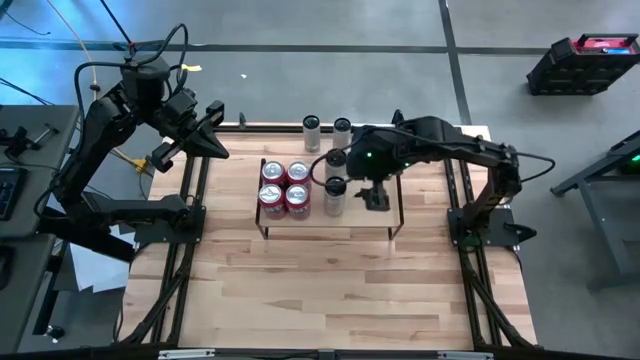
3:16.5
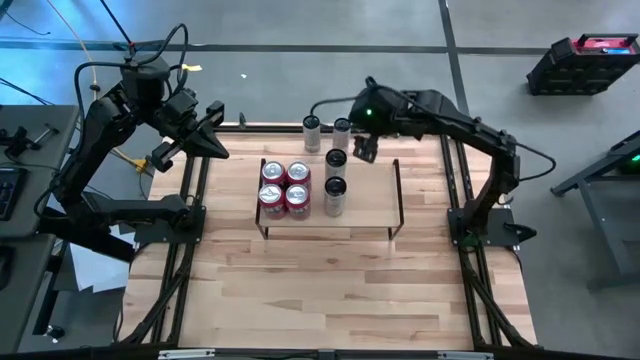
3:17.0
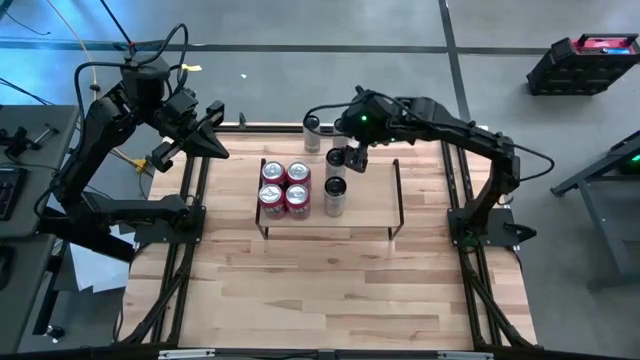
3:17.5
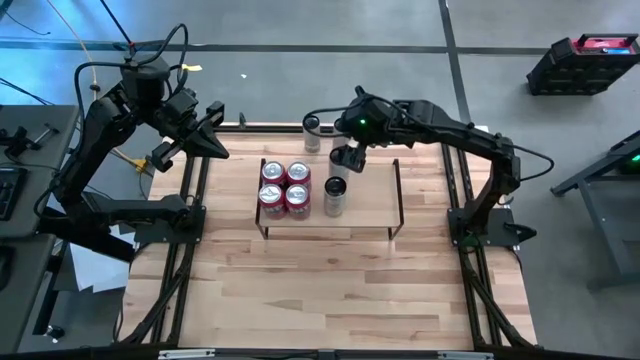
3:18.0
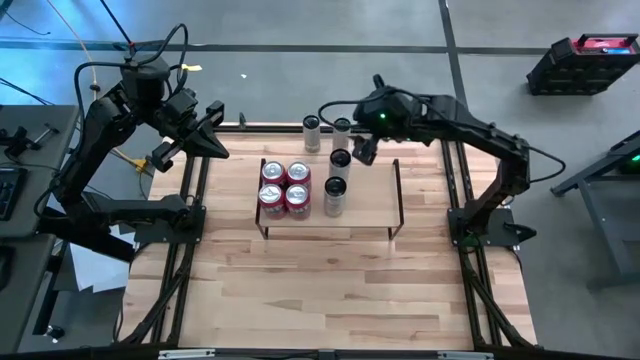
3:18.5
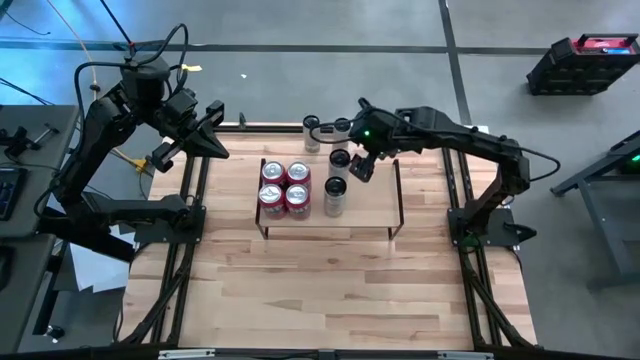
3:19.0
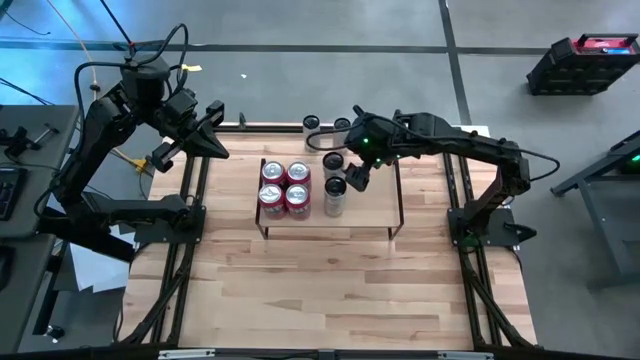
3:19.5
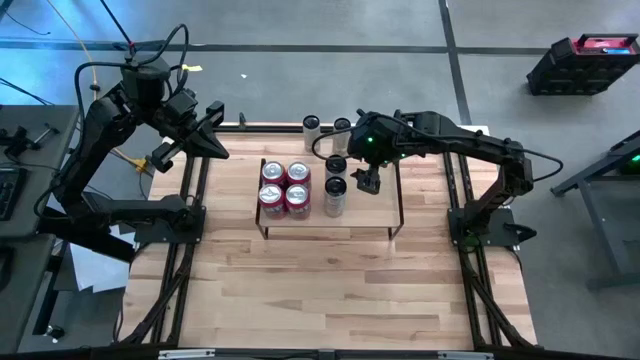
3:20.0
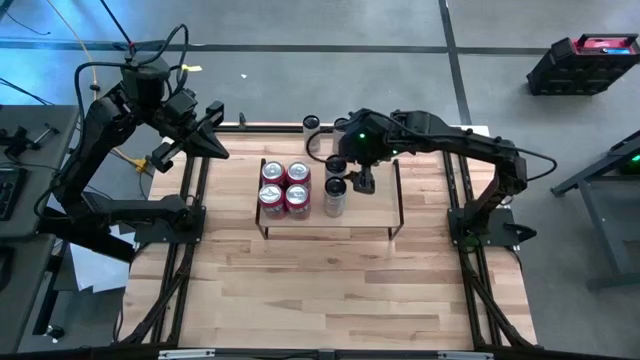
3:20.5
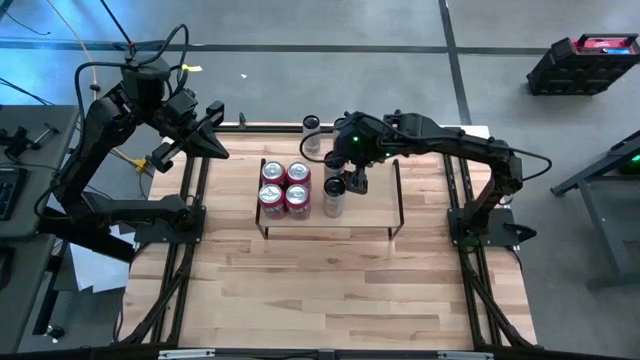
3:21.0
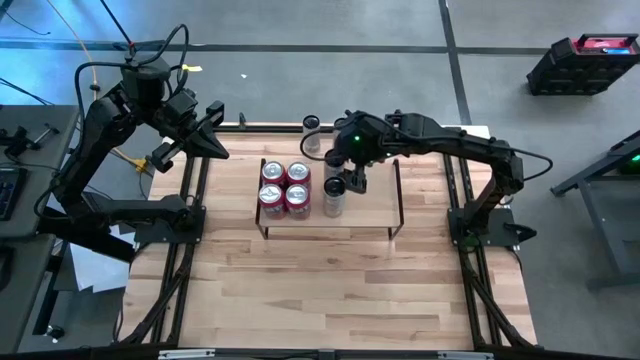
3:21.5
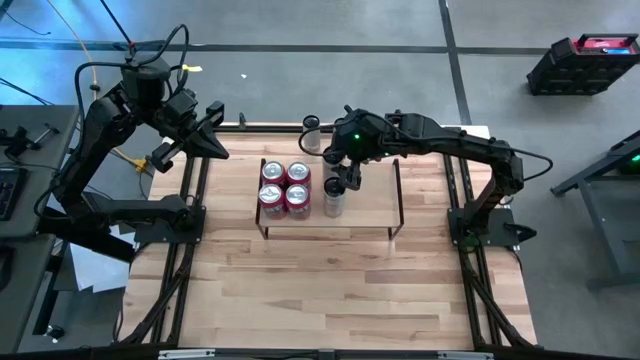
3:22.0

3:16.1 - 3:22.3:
Task: Place canned beverage on shelf
Adjust the white yellow soda can on the shelf

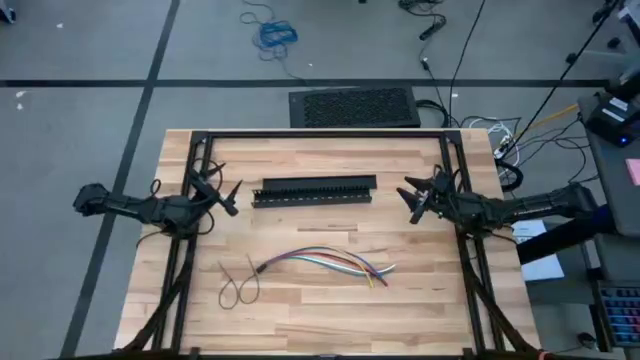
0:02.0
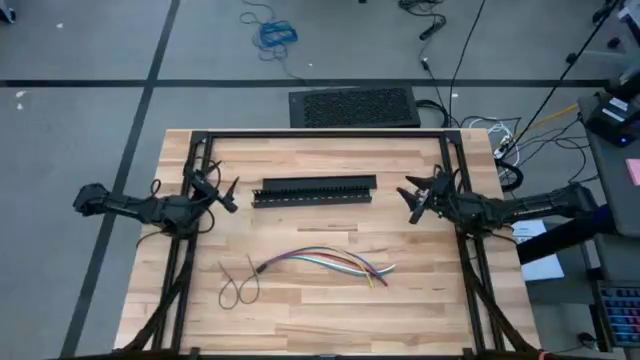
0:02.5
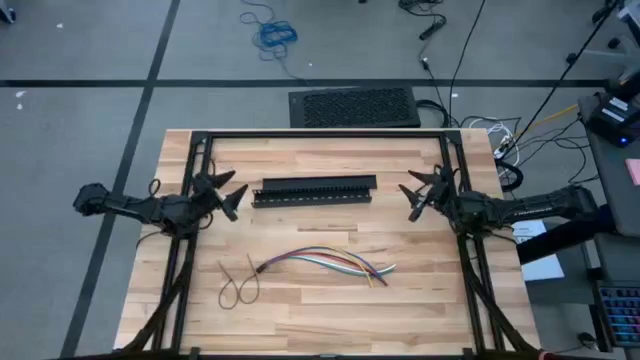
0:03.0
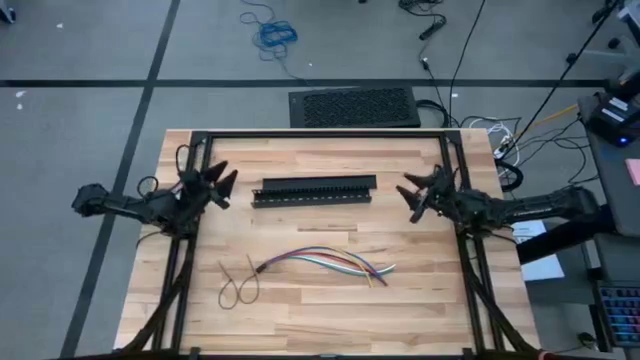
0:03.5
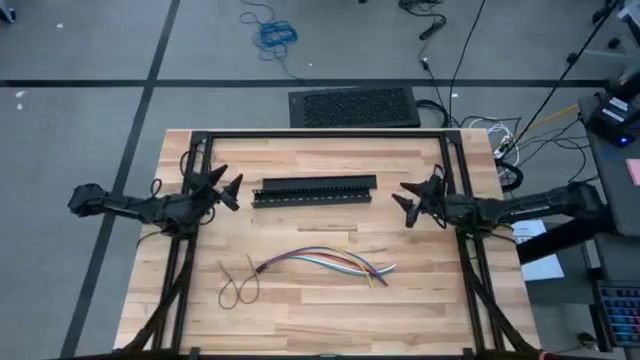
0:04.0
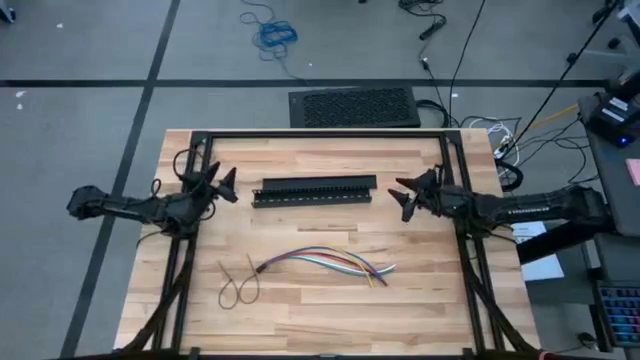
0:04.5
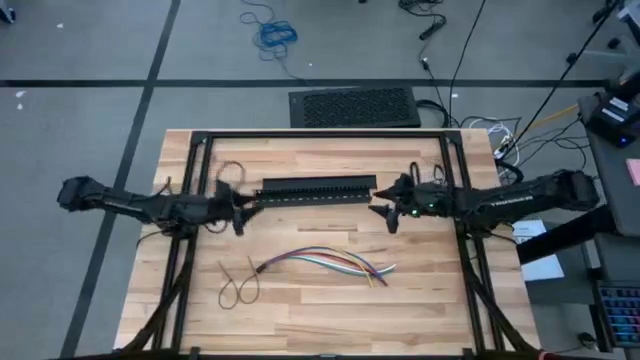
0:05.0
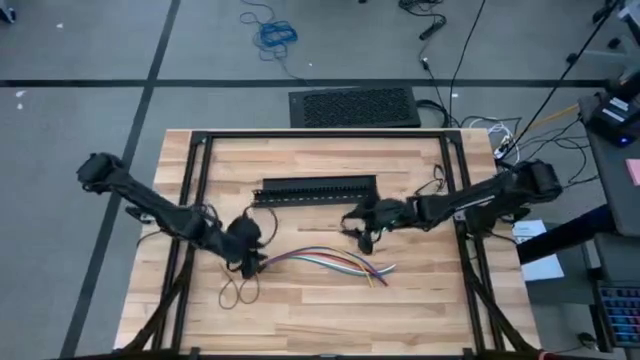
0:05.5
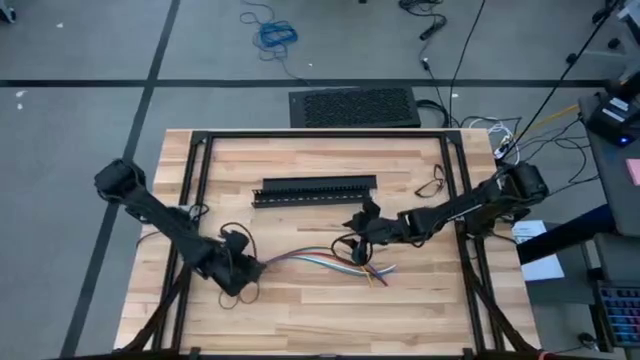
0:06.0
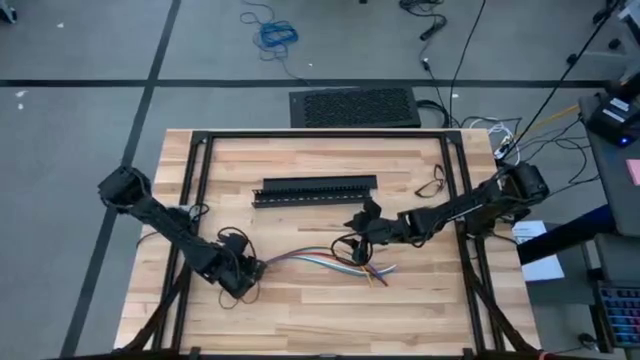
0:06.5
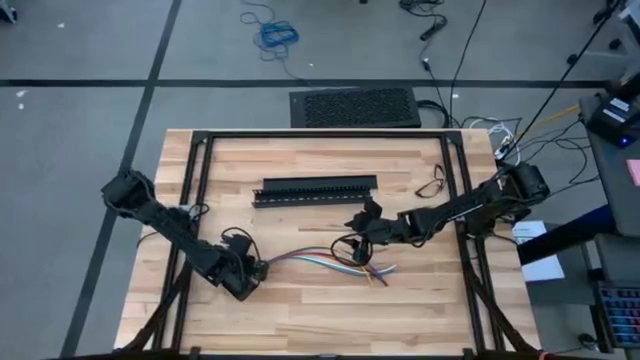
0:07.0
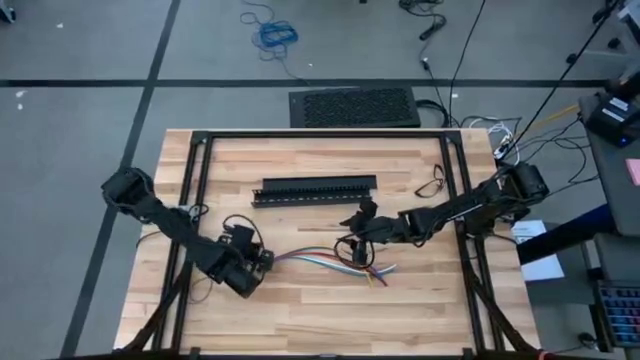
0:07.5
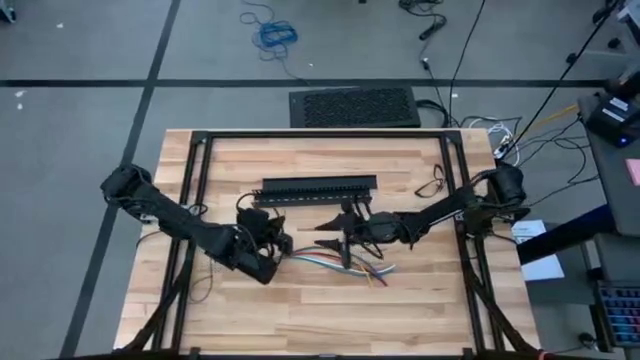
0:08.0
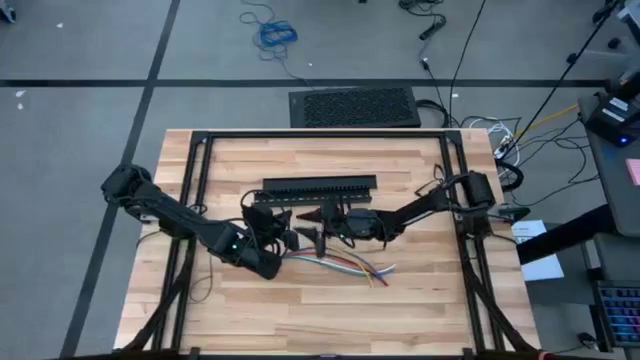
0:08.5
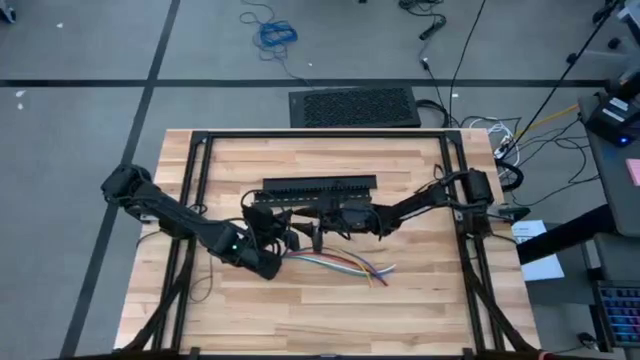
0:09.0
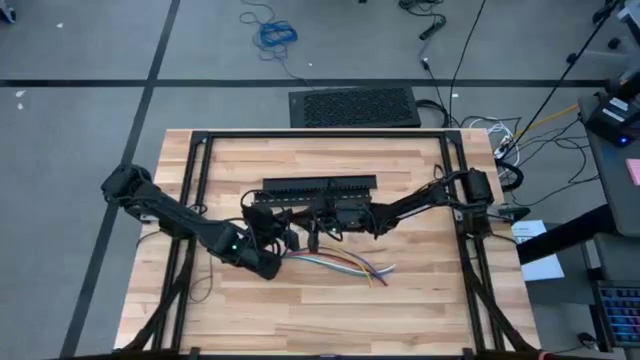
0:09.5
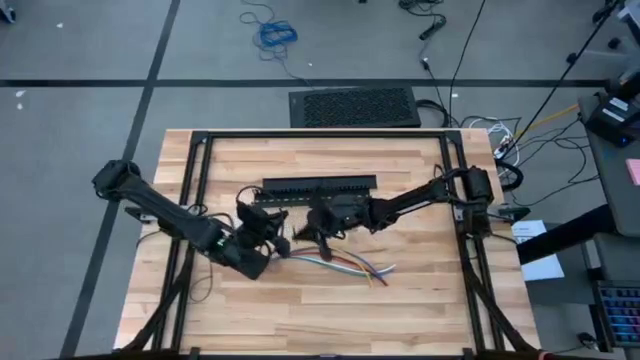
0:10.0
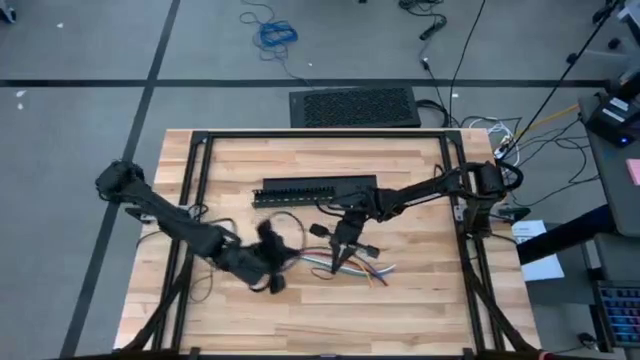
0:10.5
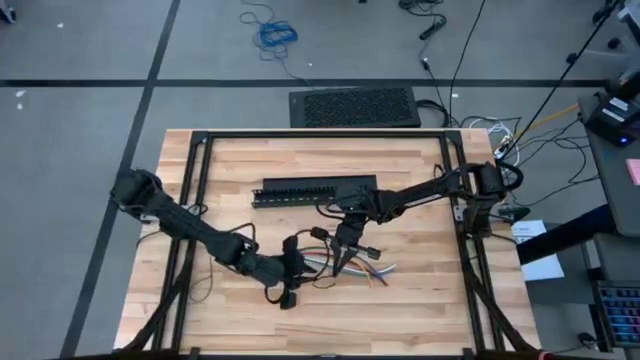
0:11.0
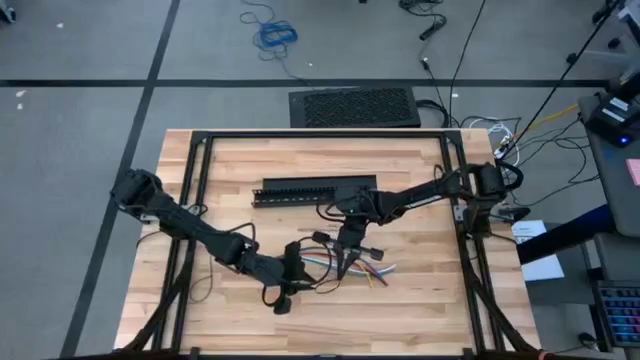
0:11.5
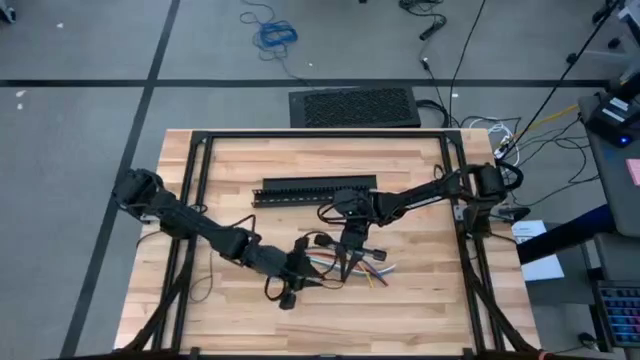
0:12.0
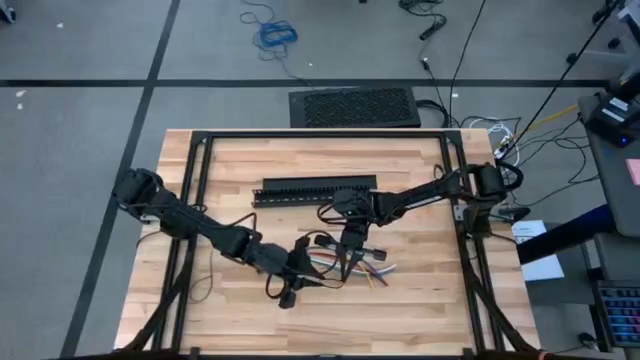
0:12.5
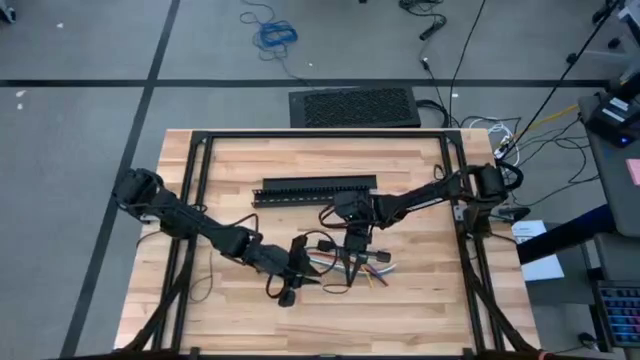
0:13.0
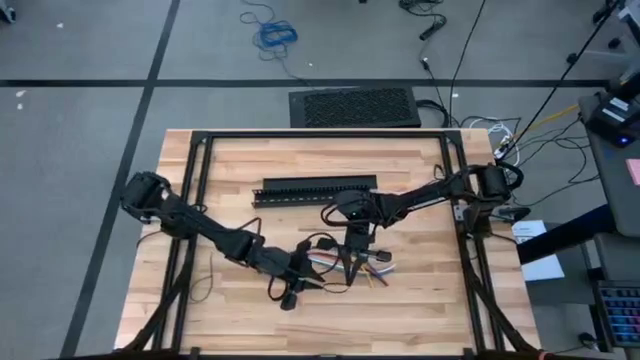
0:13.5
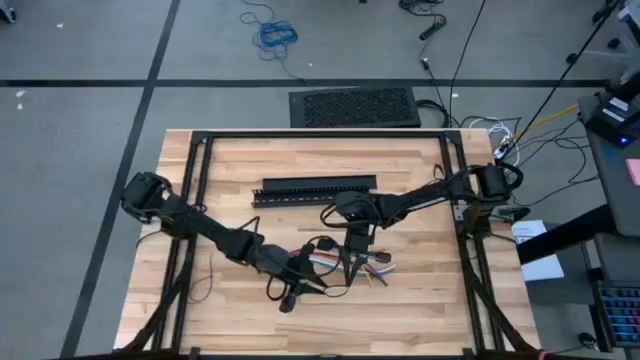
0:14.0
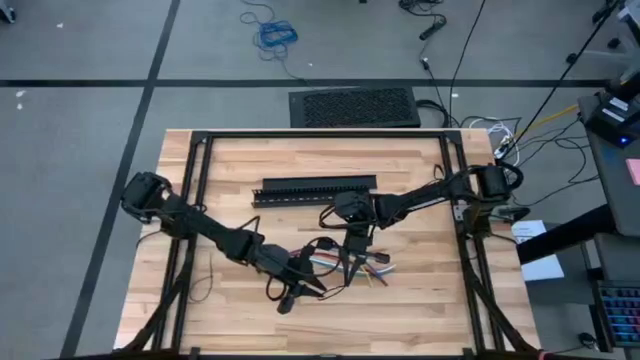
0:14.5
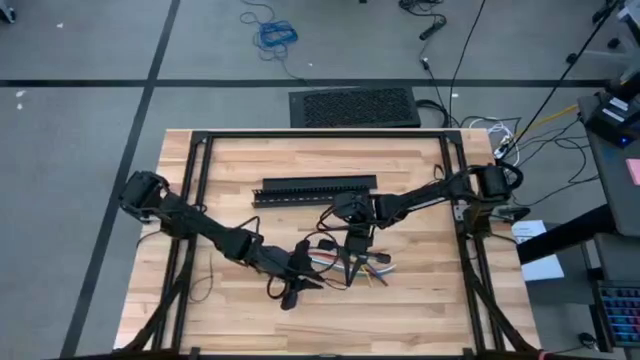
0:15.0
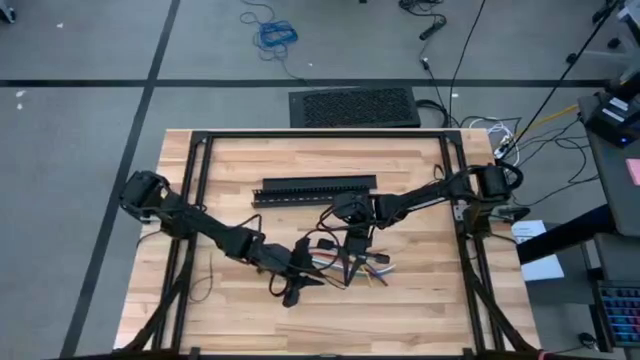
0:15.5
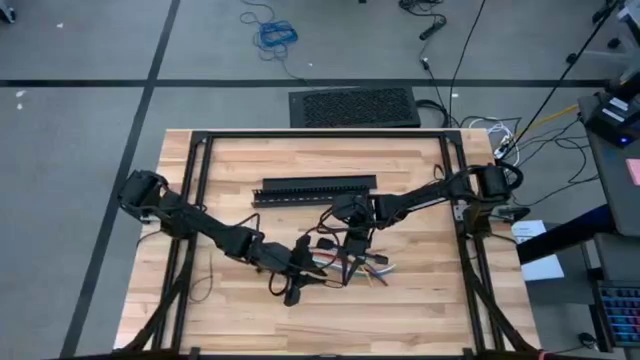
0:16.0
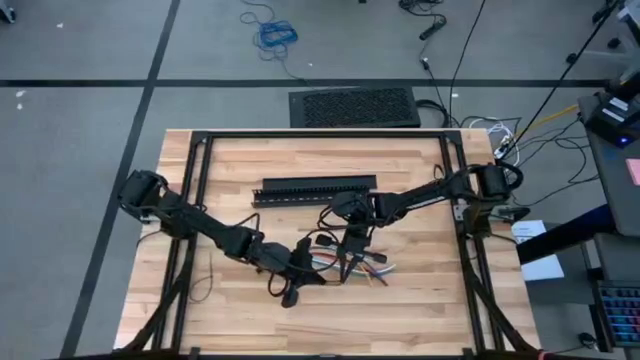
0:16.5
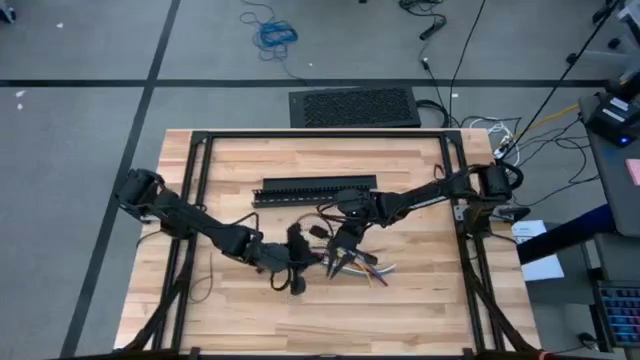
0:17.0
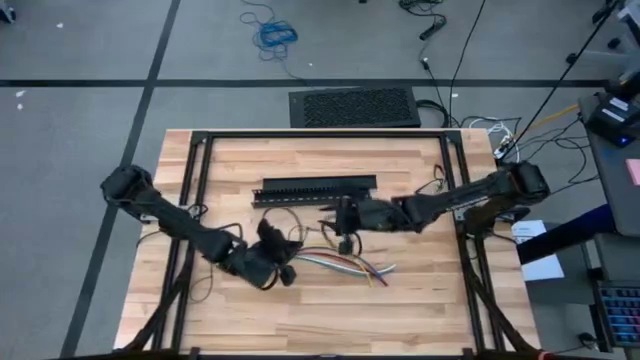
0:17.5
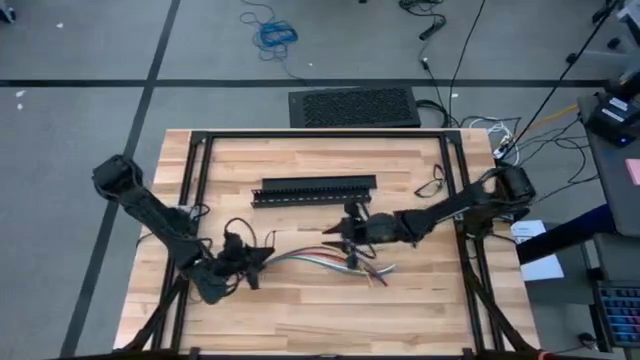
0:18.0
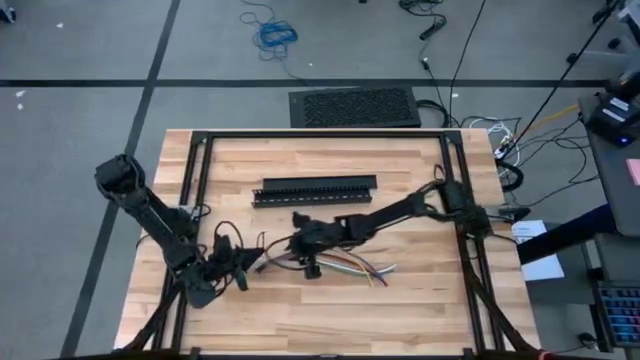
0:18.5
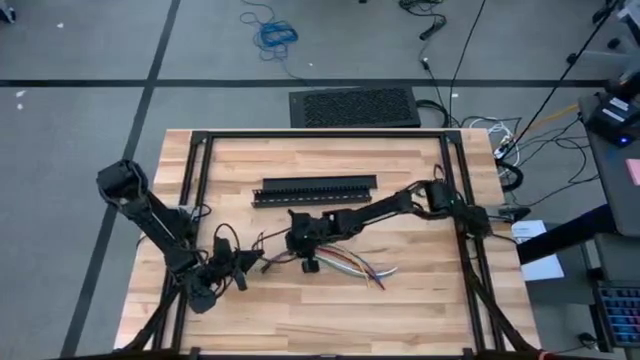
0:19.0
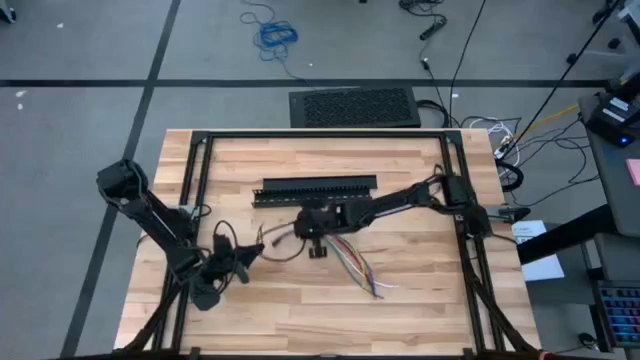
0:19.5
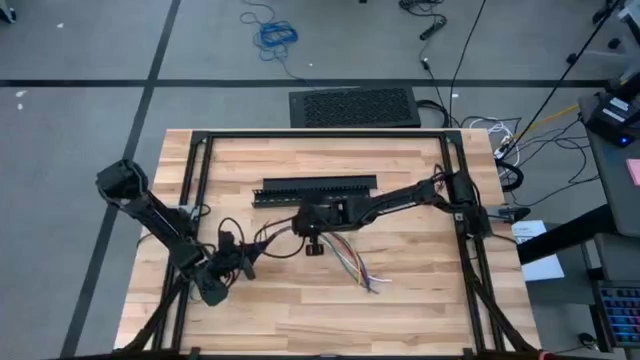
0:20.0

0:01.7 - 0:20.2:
Task: Ziptie cables
Wrap the cables together using a zip tie
